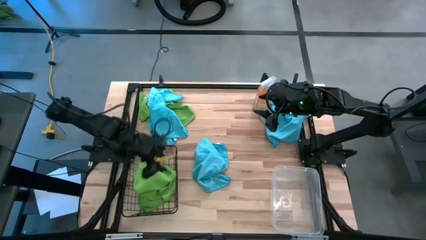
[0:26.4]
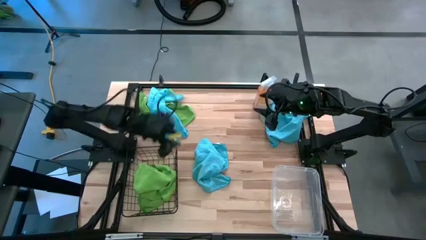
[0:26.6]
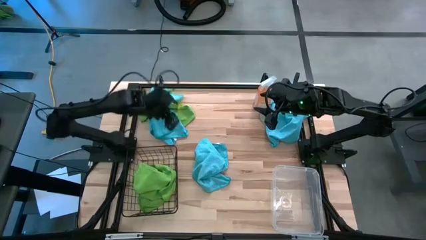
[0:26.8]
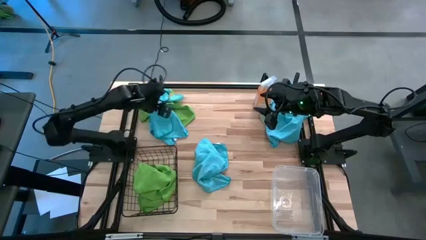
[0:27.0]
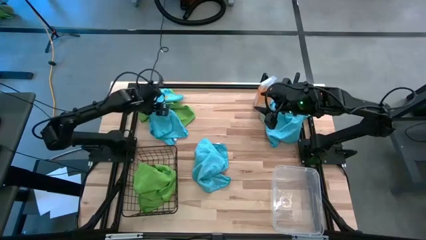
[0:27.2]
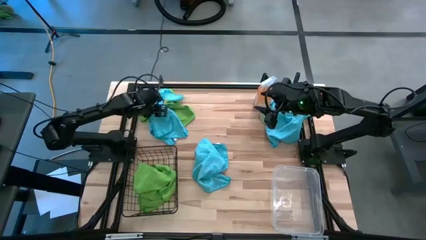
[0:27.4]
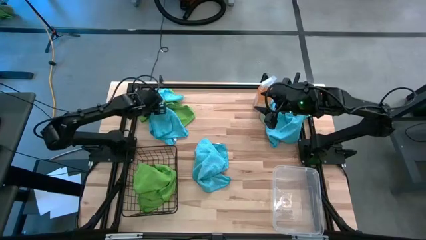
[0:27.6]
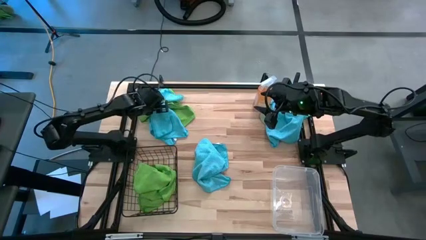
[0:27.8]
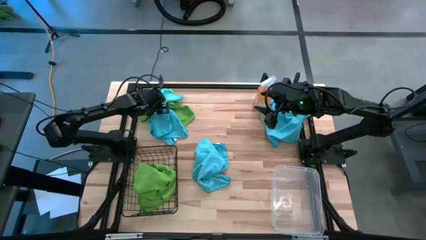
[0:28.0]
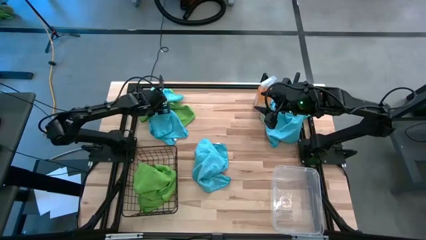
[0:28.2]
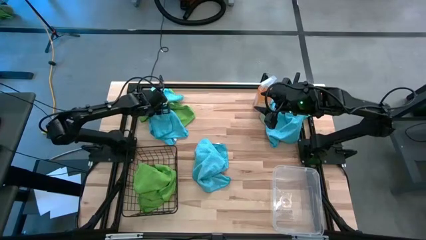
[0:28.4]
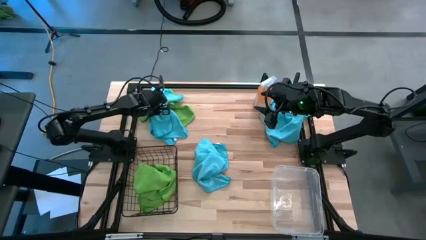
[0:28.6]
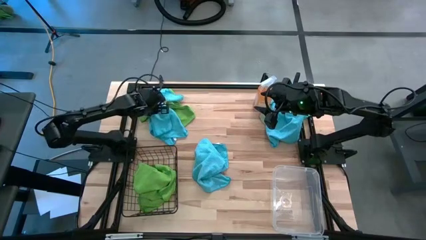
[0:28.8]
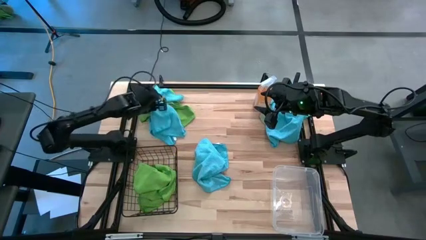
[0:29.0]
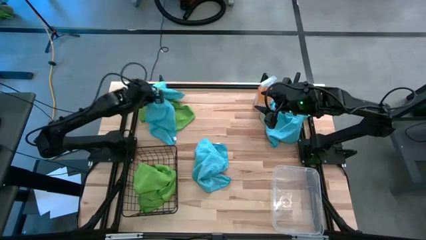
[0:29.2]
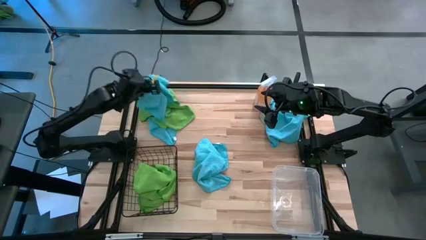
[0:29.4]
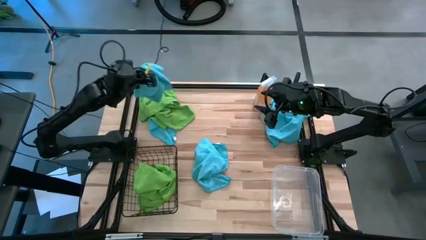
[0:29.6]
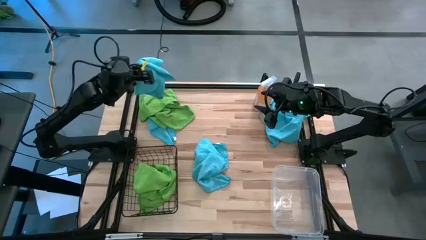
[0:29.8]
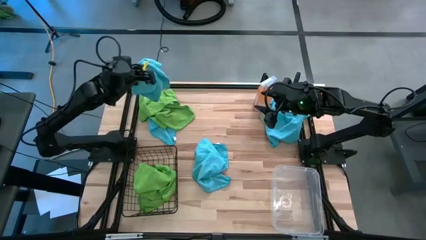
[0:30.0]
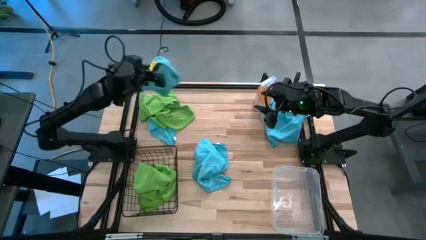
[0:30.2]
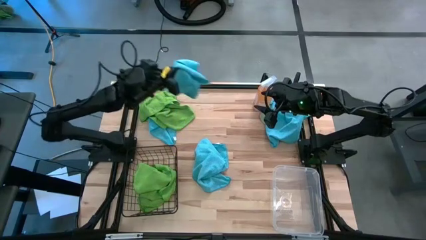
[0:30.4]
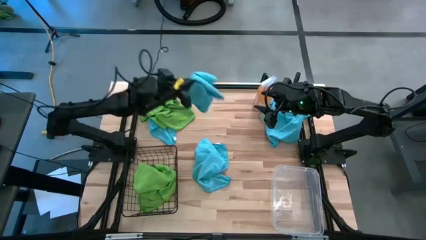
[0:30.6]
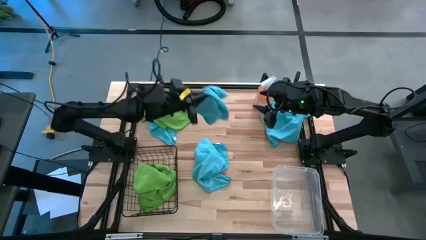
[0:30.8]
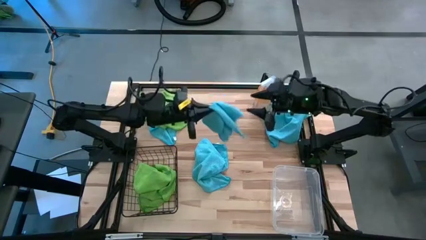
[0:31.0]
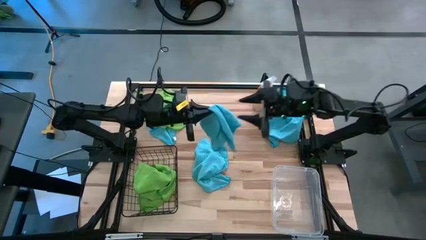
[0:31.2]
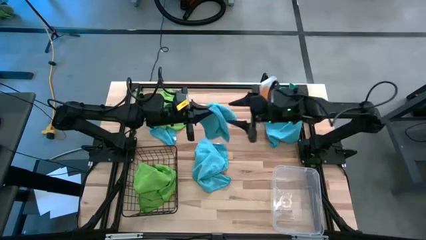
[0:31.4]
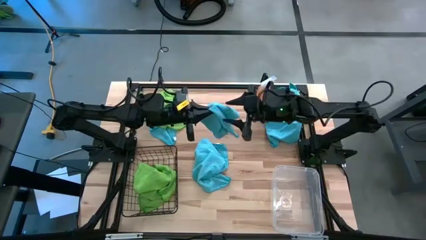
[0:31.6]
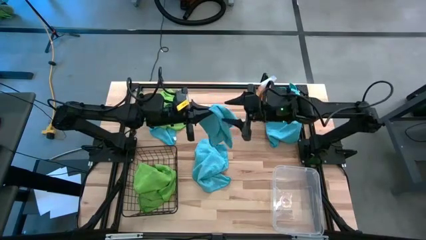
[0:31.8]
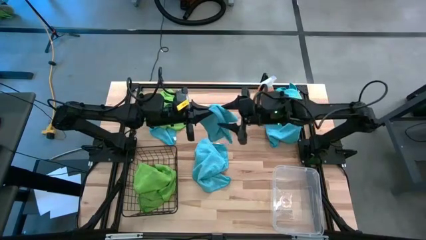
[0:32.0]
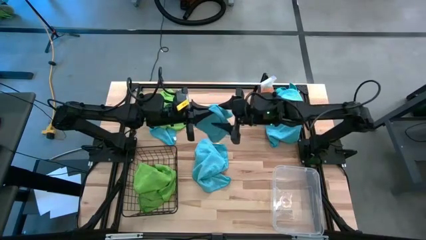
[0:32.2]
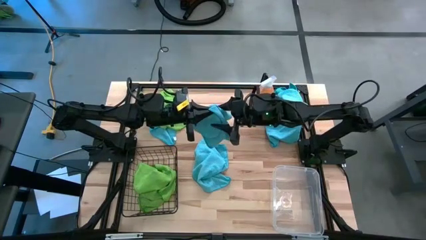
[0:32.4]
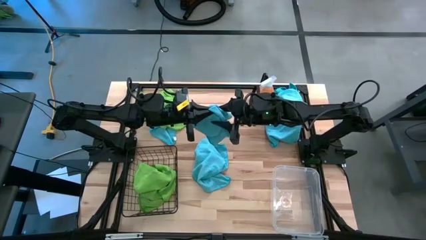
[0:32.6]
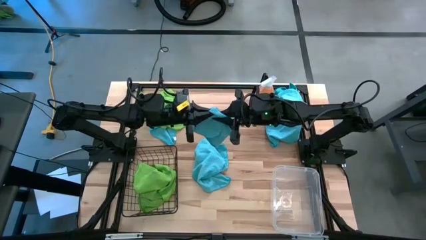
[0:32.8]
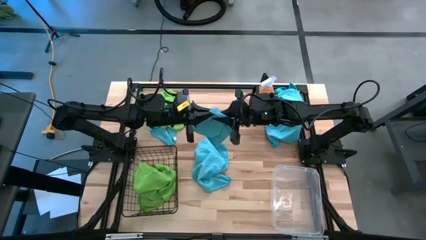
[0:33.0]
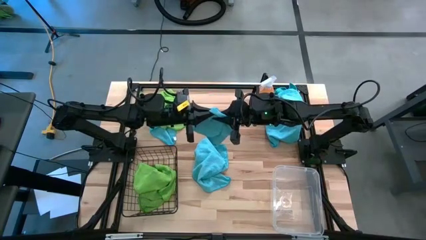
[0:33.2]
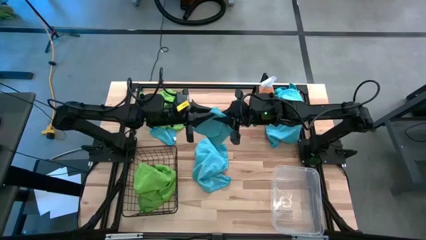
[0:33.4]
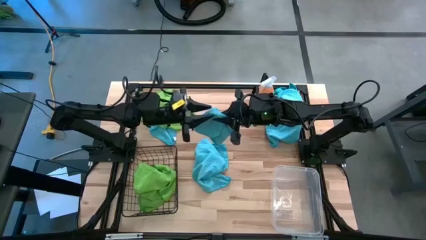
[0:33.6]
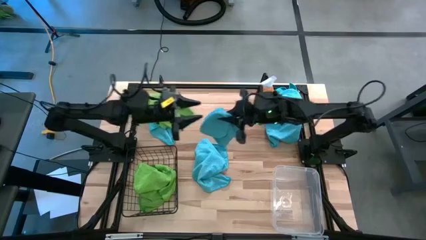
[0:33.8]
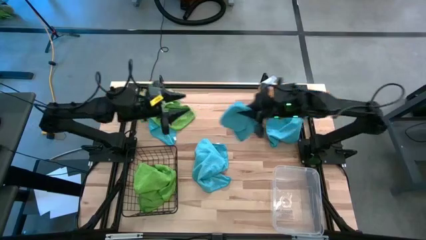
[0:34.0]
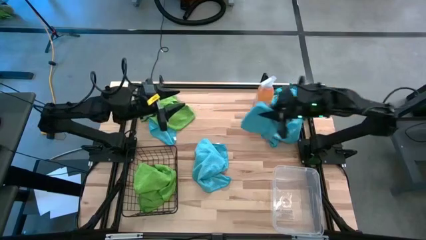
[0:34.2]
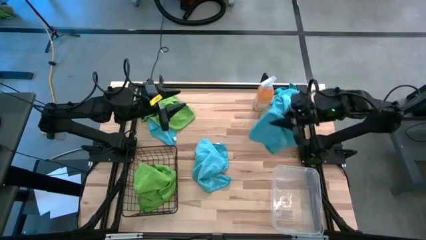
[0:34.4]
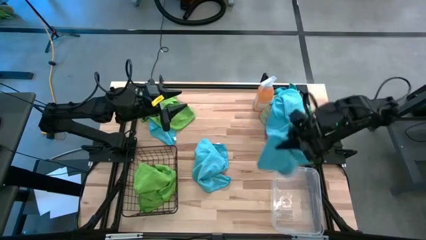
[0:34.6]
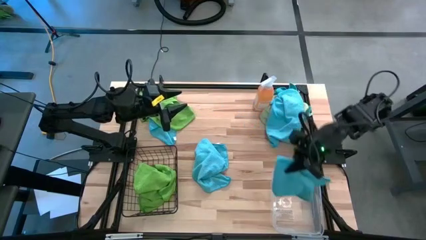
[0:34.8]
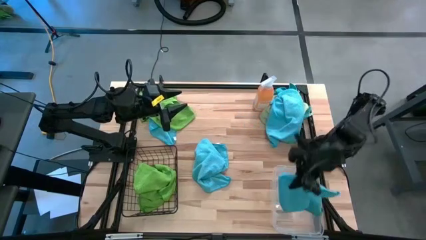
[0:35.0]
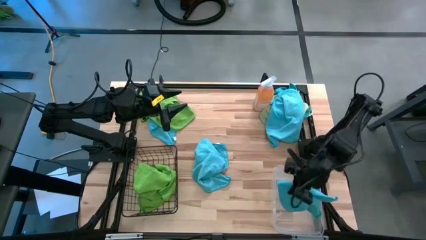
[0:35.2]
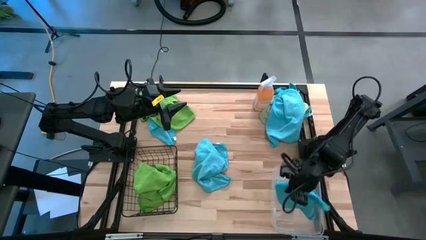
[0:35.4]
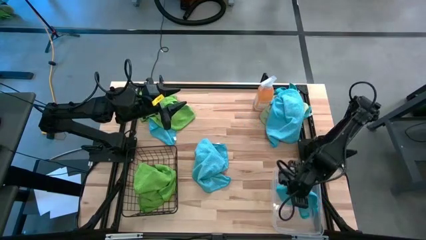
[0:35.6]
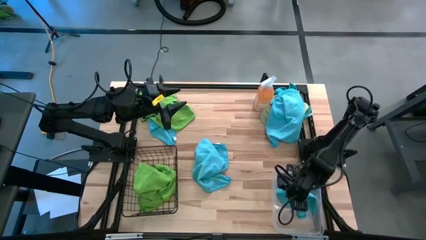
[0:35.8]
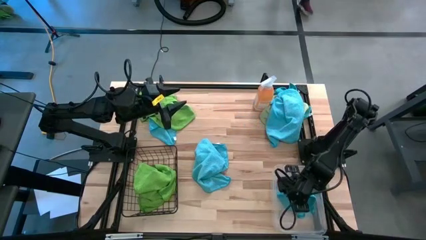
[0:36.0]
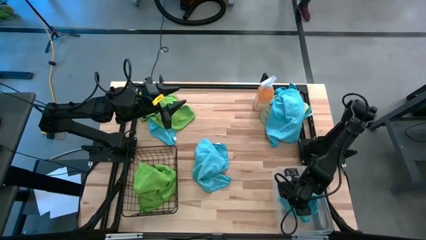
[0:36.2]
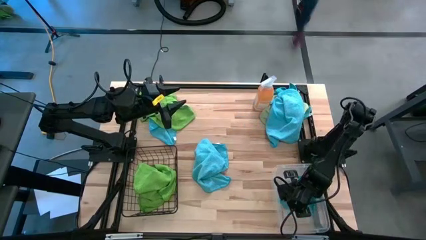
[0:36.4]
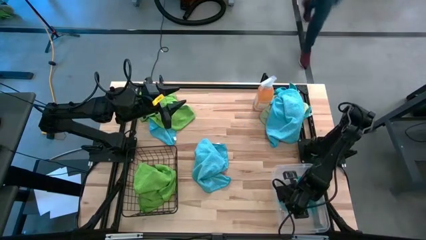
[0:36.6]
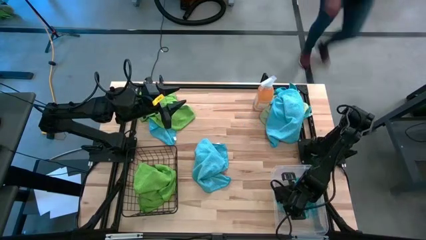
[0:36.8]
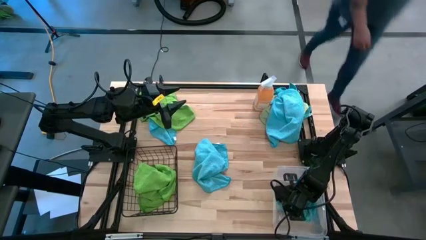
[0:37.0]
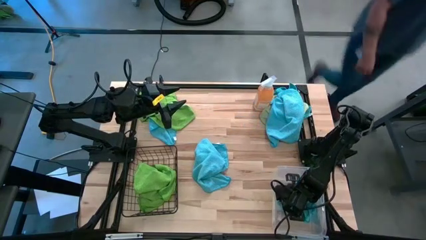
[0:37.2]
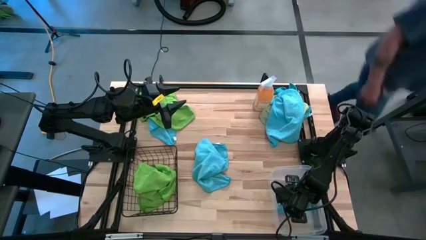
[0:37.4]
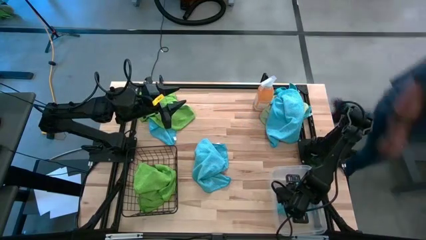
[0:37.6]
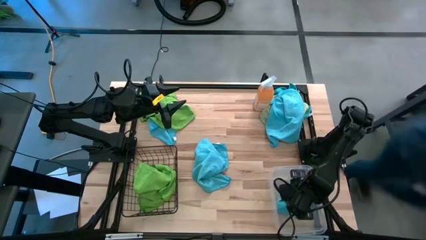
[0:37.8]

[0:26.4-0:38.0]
Task: Sort microfiber towel by color & place in baskets
Put the blue microfiber cloth into the transparent bin
